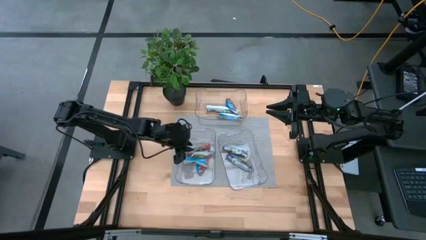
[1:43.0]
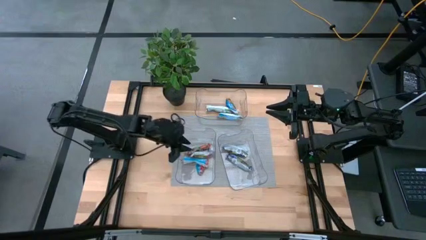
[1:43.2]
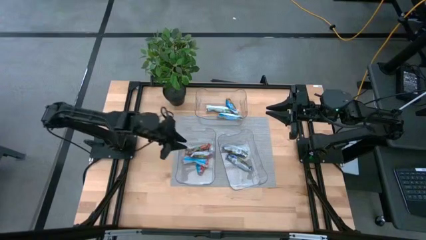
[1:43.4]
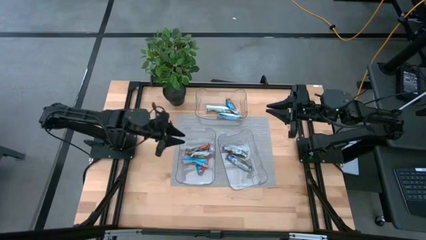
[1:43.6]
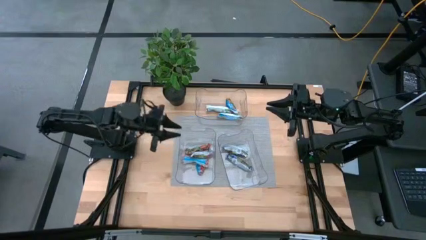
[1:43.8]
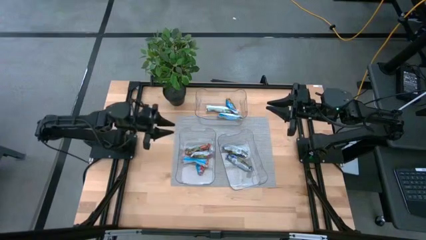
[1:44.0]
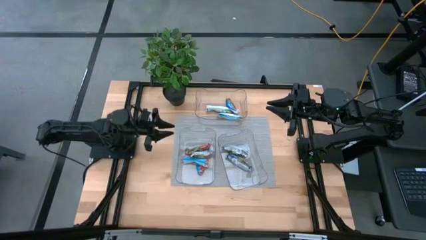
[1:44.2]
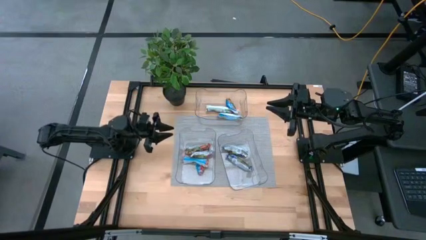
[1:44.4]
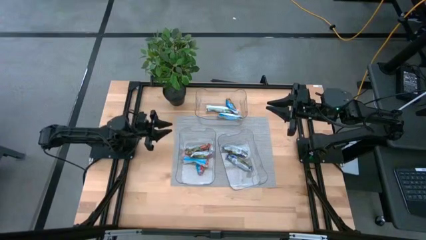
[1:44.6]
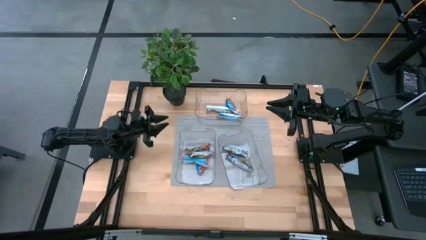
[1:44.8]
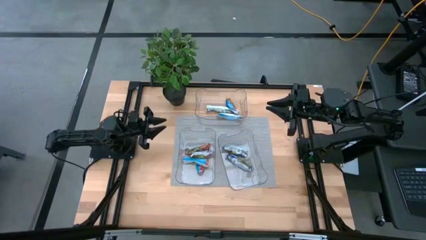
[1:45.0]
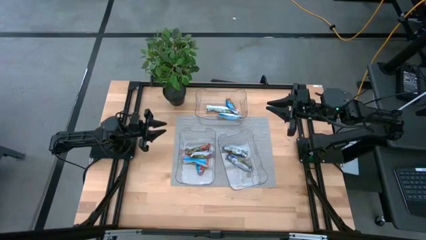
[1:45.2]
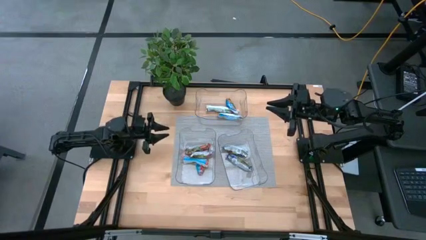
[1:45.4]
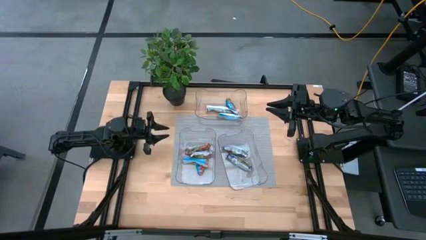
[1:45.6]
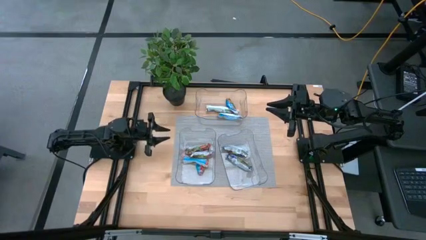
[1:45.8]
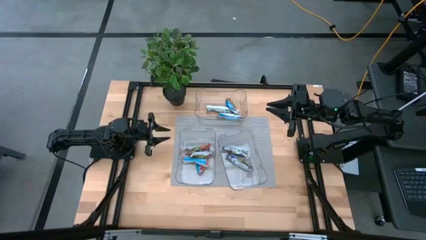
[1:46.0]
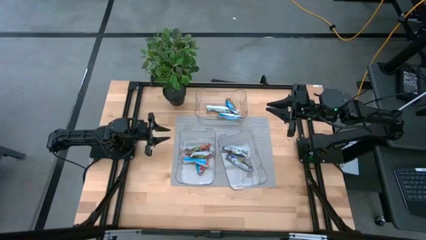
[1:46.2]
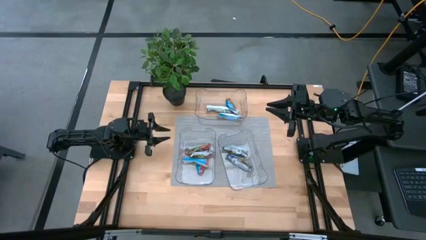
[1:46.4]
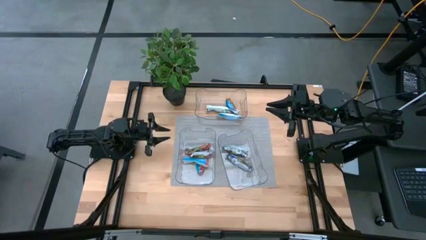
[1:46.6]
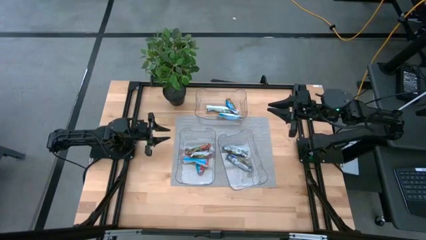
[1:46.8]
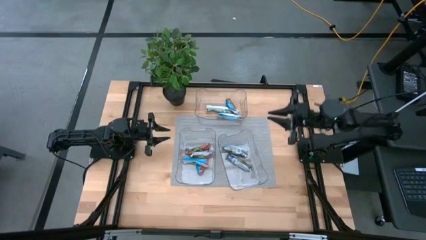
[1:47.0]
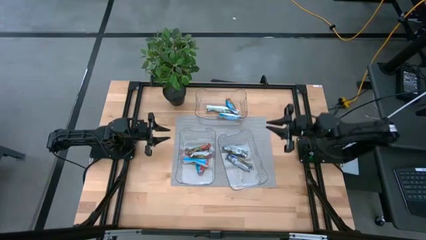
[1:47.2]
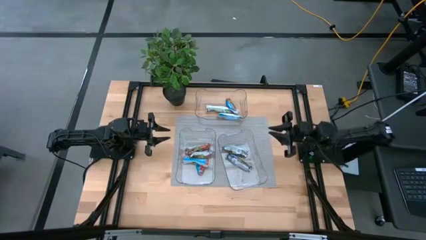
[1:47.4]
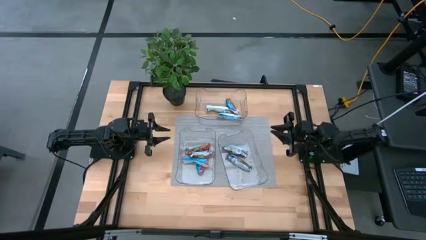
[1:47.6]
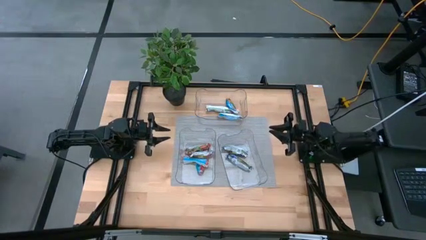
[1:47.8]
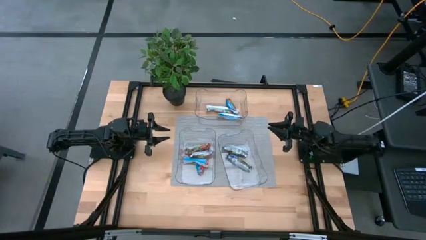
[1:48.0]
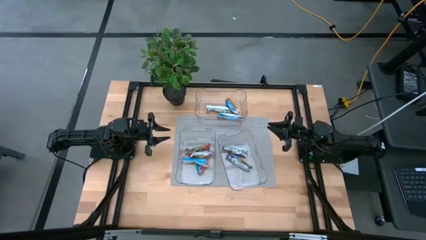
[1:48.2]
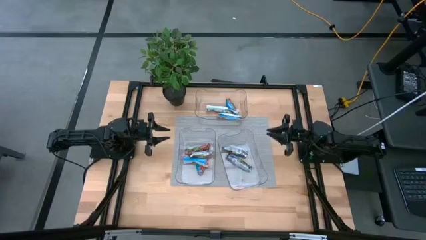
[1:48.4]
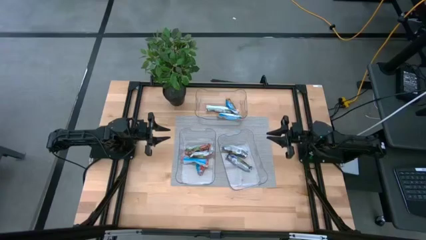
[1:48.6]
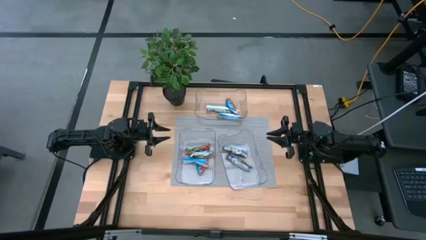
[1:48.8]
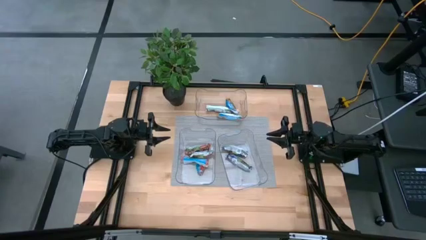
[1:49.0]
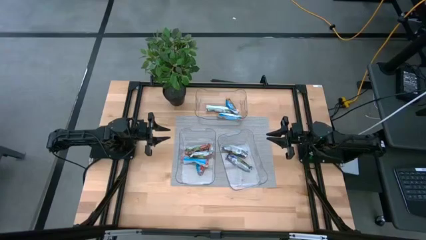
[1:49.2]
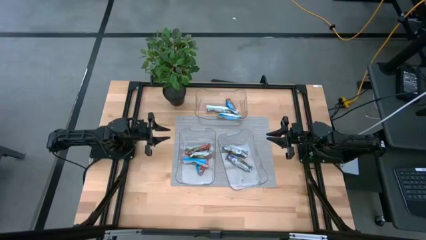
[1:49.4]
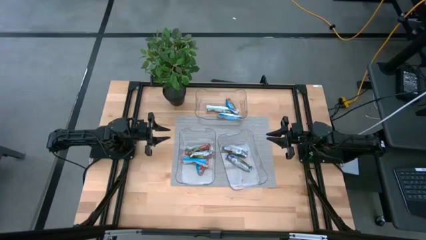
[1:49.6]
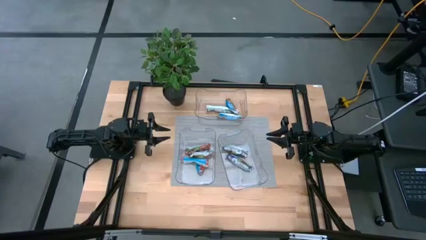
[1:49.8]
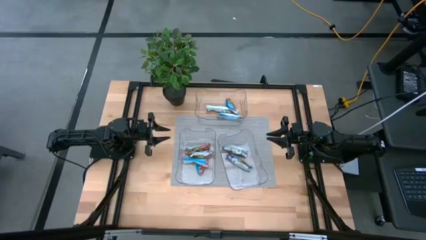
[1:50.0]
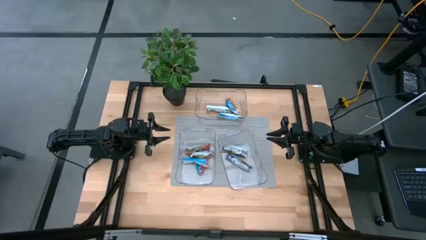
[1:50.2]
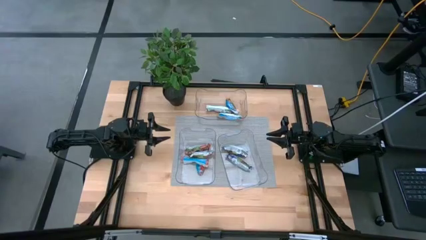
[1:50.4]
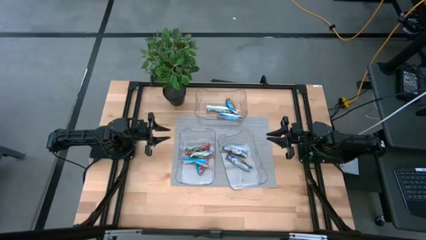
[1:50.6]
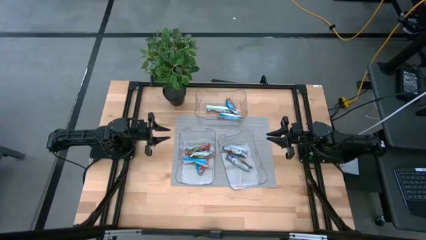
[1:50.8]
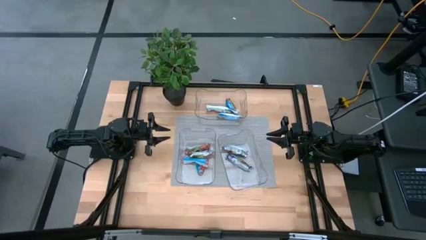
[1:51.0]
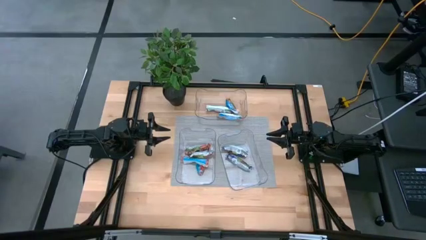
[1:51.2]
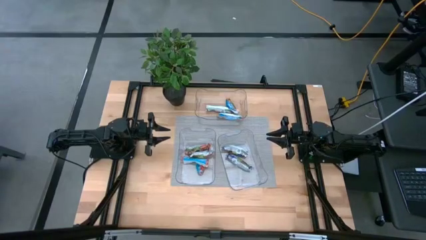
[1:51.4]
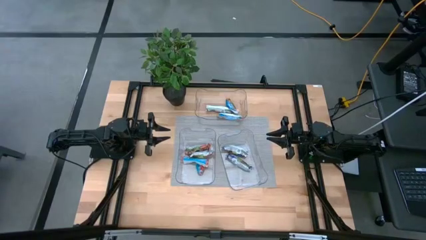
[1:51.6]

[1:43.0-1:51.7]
Task: Pick and place Granola Bars by type
Return to Home Position

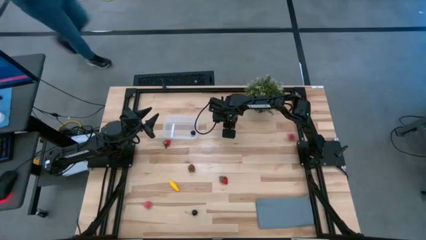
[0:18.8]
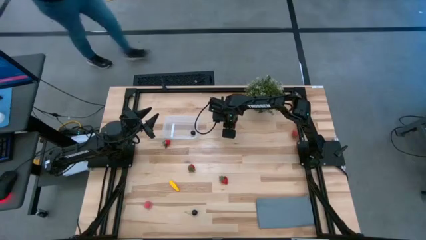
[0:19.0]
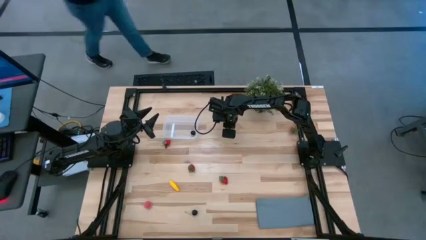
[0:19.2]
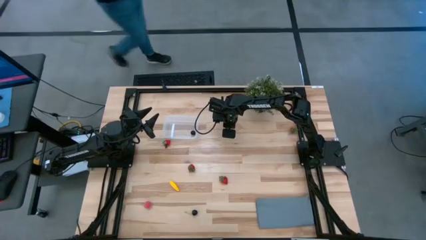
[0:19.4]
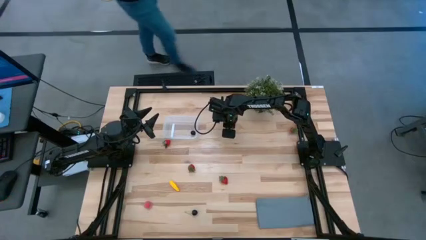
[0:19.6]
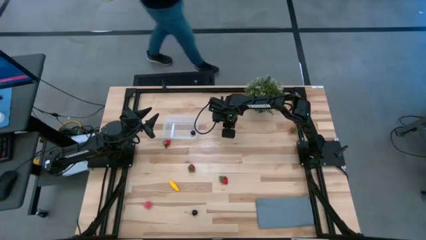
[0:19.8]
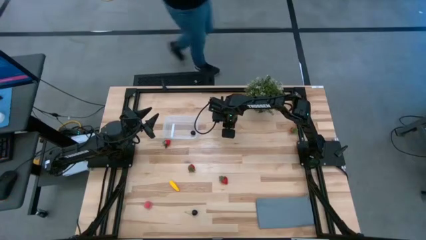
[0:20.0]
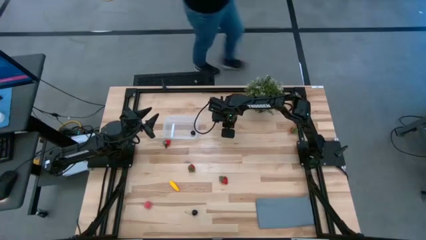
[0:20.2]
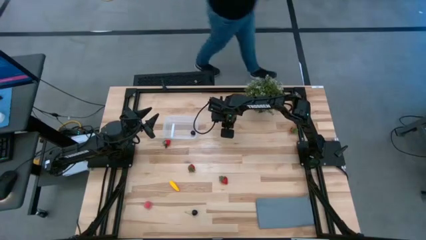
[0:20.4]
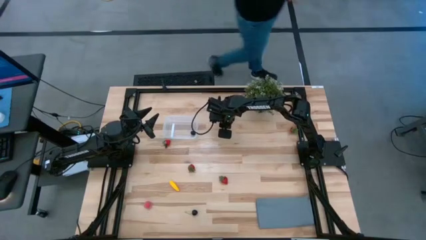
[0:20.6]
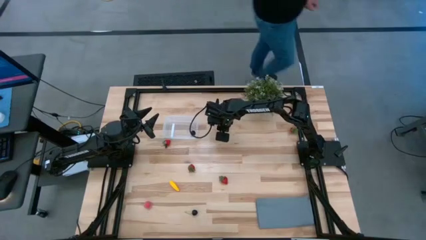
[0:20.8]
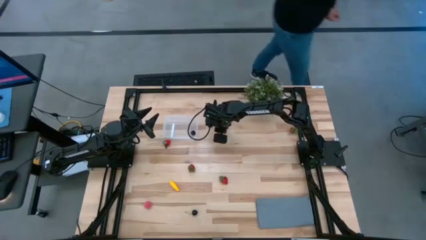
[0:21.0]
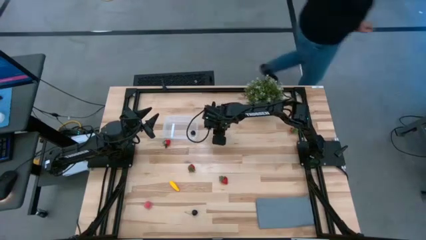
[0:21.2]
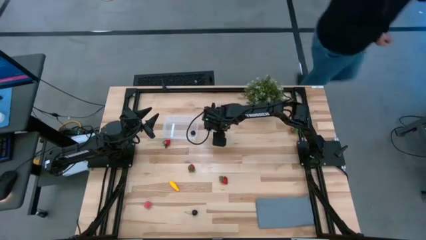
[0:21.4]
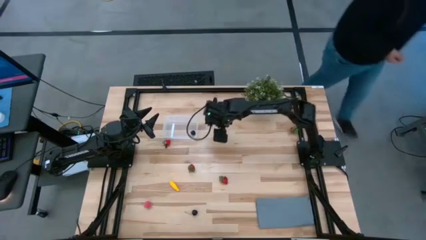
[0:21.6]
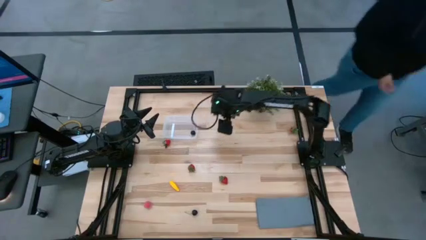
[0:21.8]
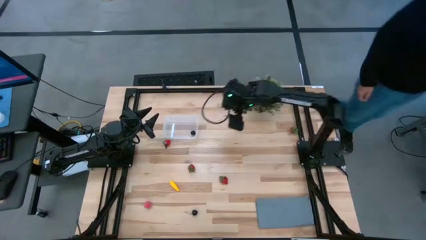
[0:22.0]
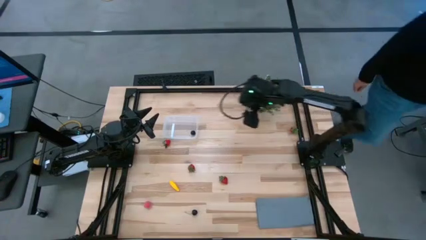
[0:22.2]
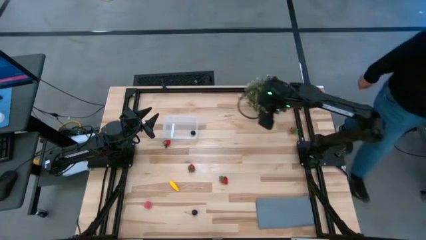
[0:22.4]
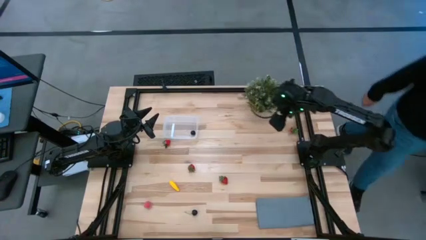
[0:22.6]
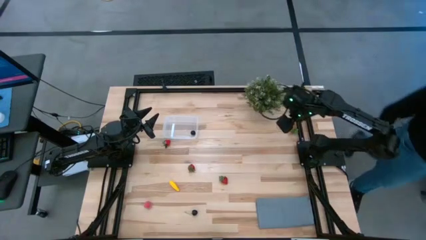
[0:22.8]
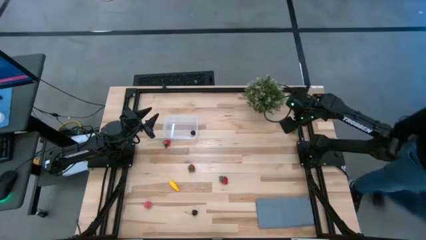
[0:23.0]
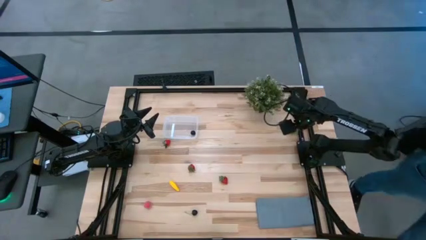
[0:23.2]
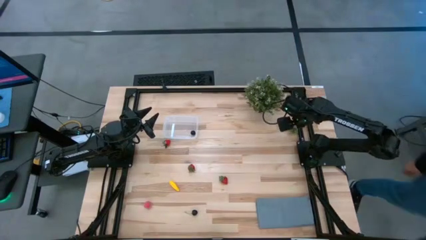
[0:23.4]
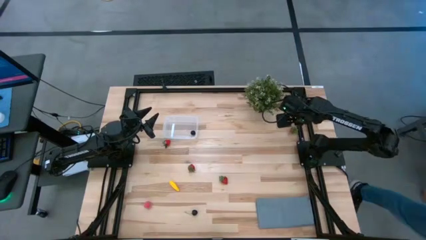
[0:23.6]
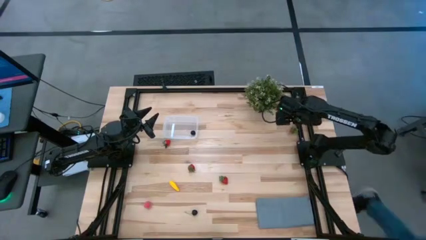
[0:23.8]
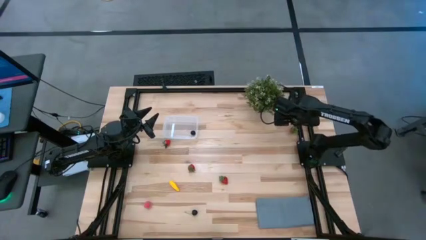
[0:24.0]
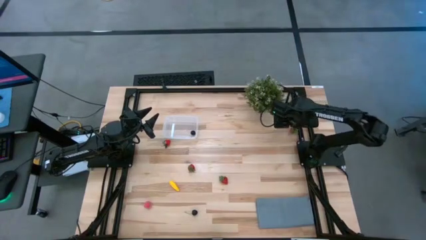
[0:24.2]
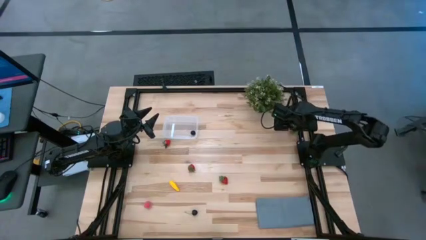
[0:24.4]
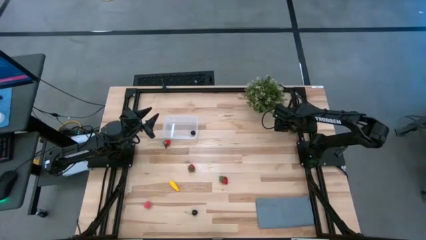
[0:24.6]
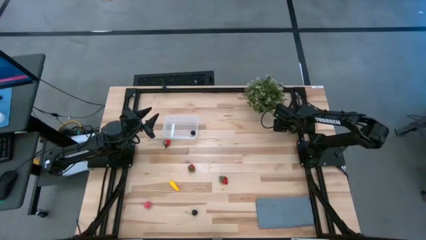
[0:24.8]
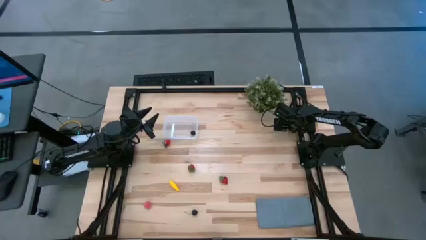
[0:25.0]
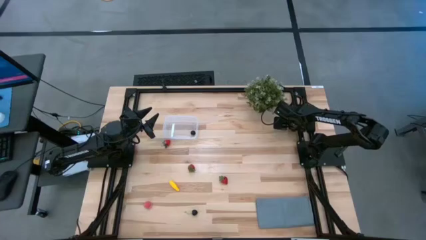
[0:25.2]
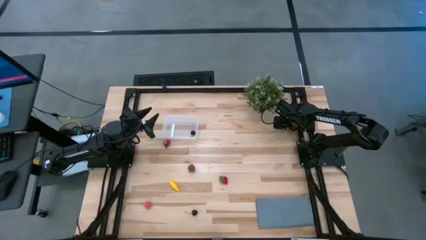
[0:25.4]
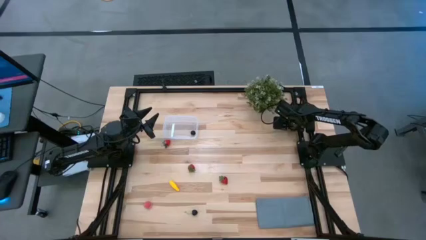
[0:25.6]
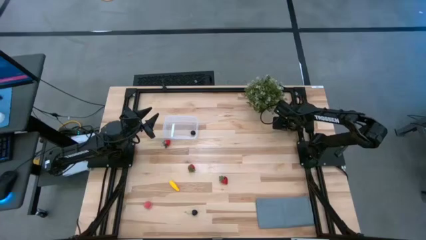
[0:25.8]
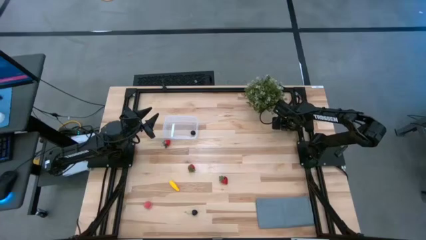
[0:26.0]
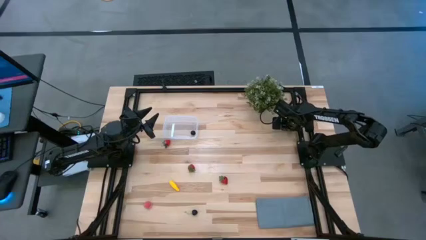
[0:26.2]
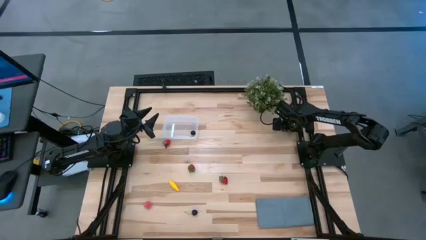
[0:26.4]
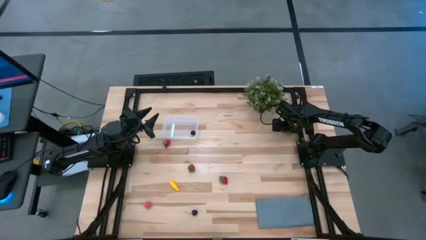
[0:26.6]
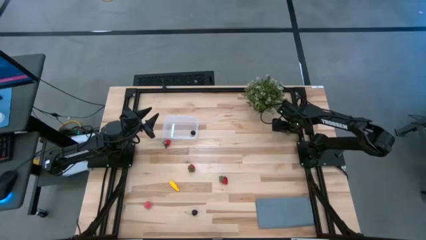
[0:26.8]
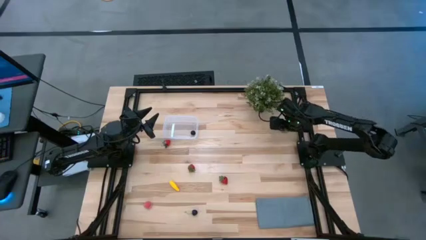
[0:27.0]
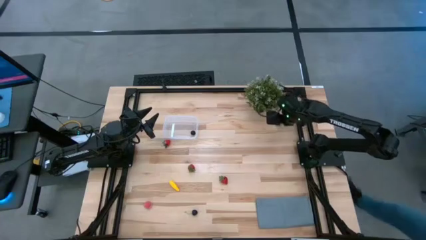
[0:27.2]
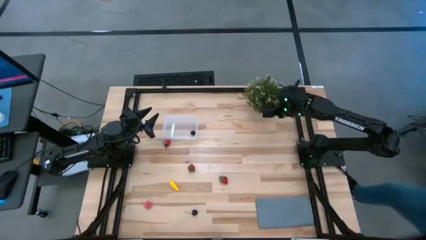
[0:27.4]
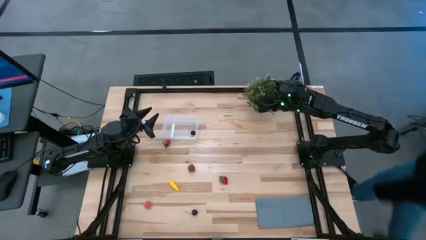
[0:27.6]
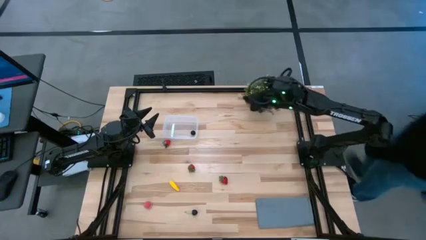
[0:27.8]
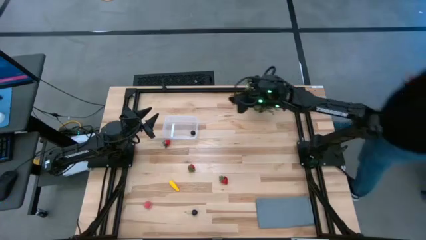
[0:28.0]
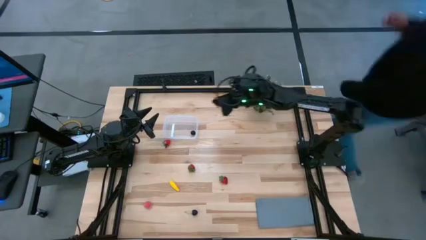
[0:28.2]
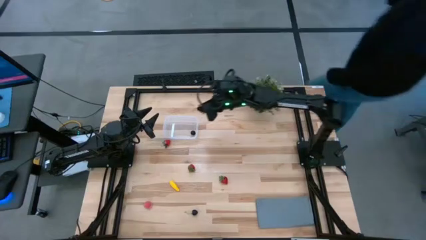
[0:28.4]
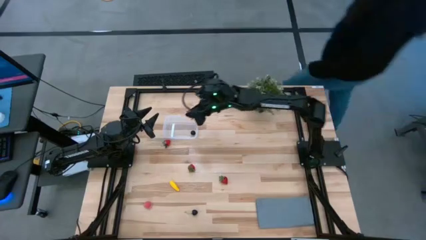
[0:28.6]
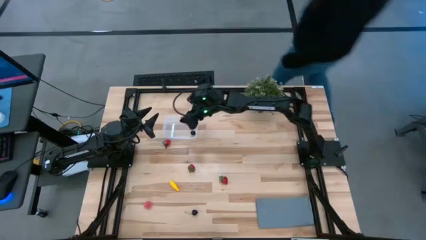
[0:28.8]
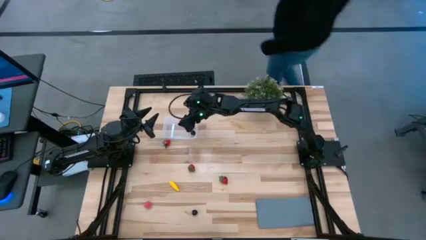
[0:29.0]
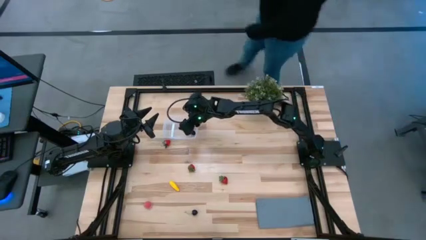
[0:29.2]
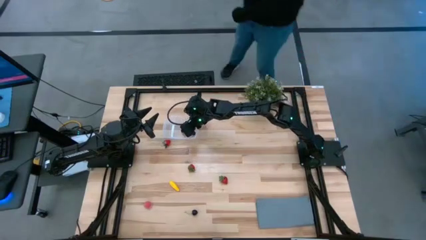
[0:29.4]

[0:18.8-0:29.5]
Task: Pick and placing Produce into tupperware
Put the strawberry into the transparent bin
